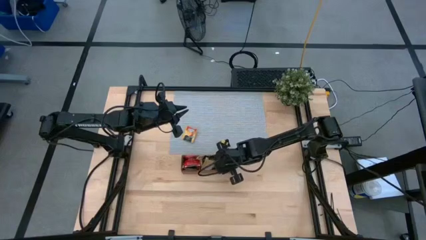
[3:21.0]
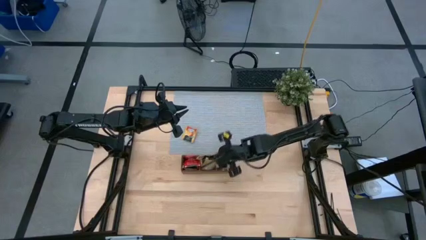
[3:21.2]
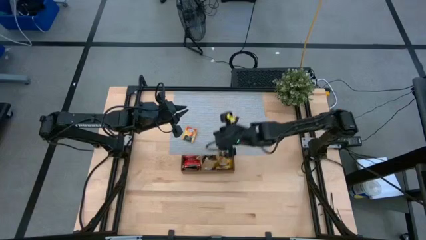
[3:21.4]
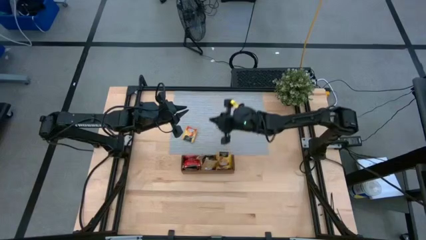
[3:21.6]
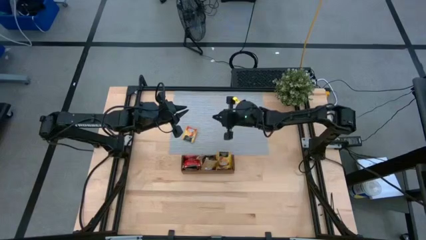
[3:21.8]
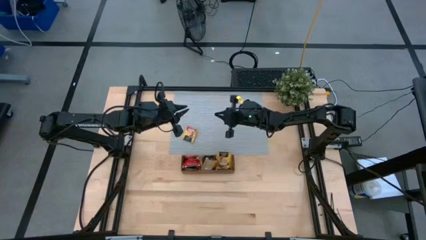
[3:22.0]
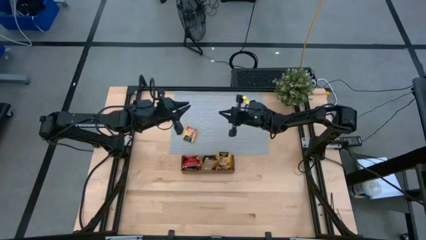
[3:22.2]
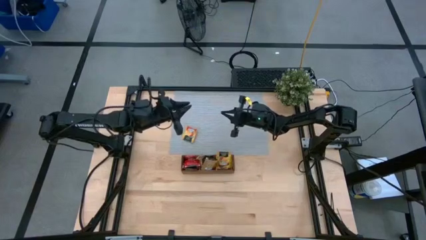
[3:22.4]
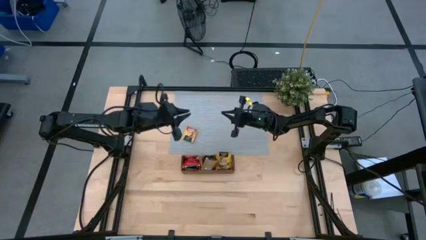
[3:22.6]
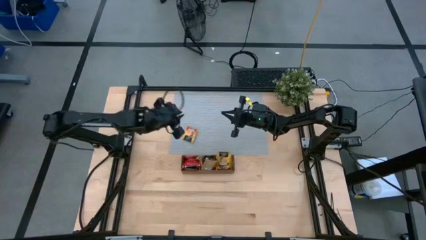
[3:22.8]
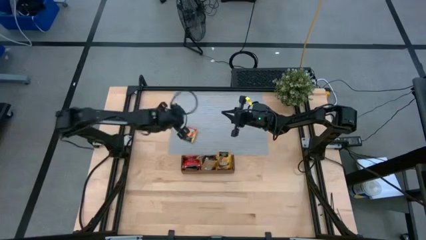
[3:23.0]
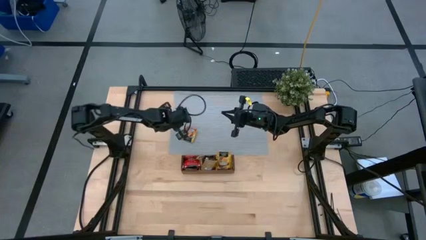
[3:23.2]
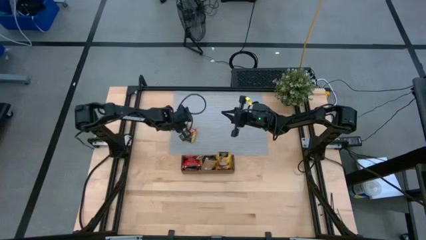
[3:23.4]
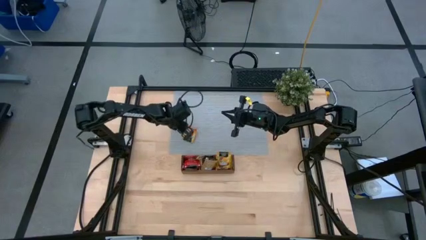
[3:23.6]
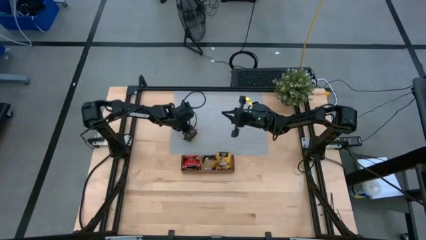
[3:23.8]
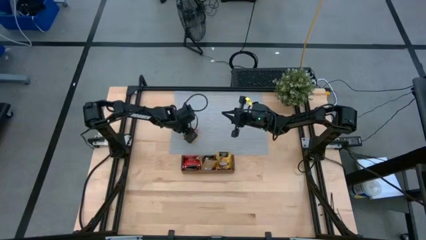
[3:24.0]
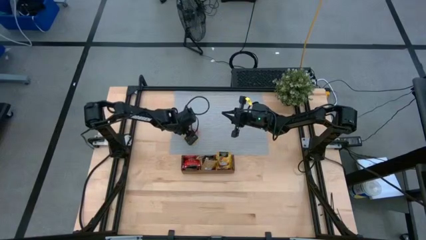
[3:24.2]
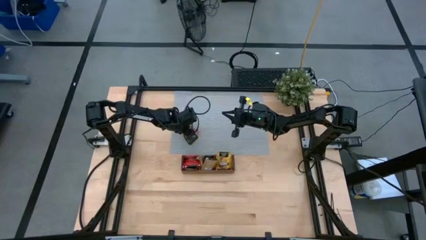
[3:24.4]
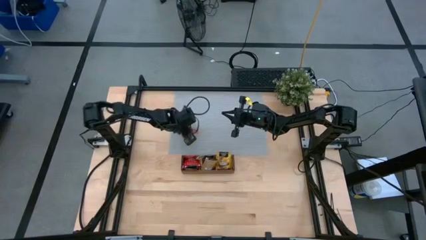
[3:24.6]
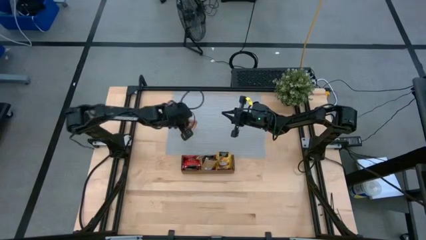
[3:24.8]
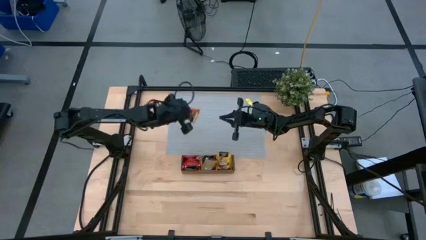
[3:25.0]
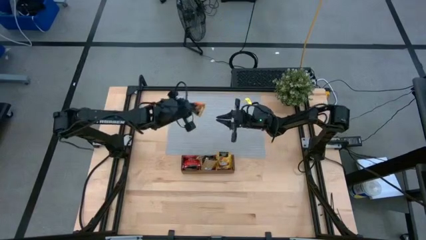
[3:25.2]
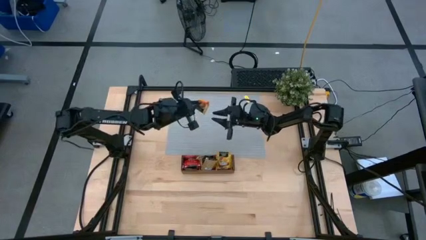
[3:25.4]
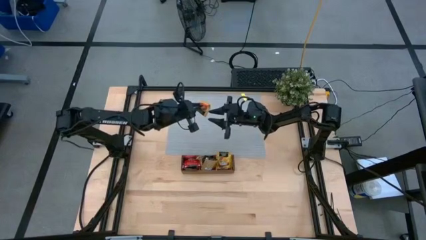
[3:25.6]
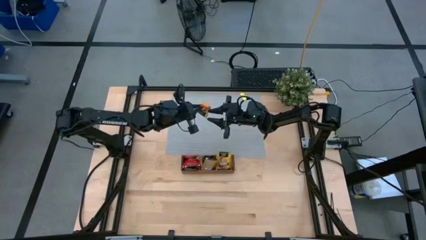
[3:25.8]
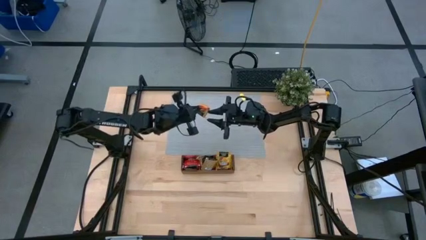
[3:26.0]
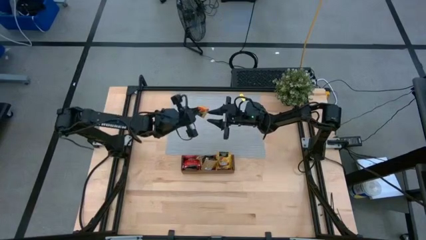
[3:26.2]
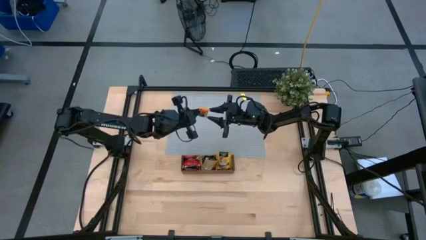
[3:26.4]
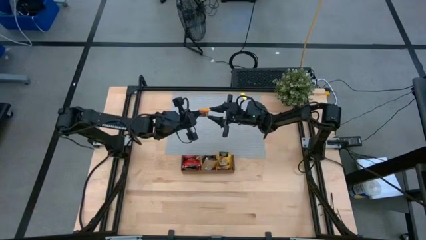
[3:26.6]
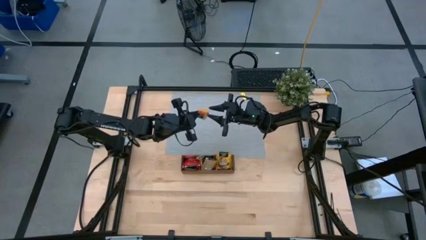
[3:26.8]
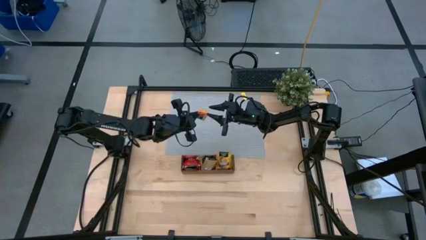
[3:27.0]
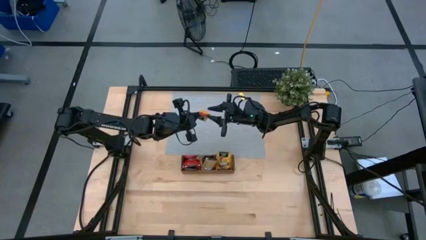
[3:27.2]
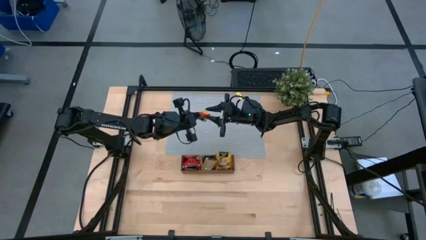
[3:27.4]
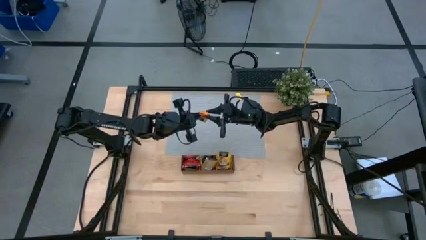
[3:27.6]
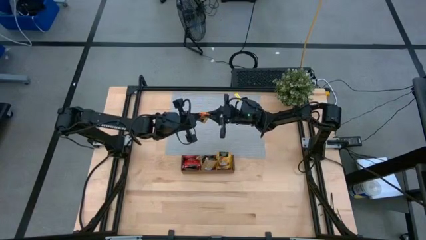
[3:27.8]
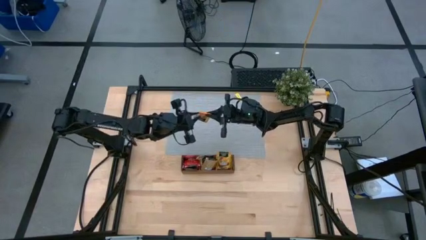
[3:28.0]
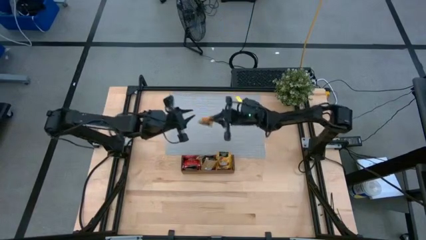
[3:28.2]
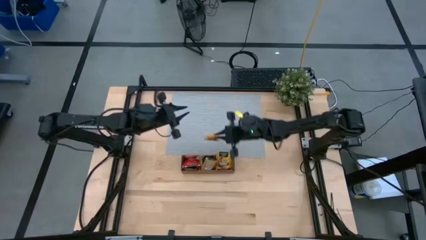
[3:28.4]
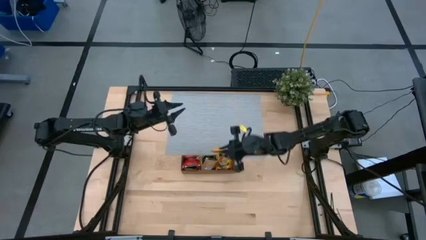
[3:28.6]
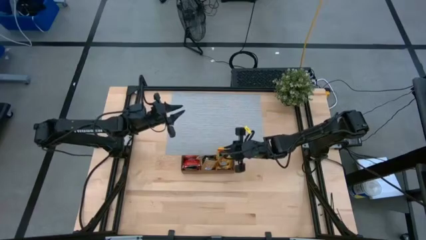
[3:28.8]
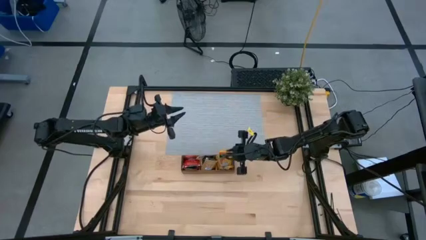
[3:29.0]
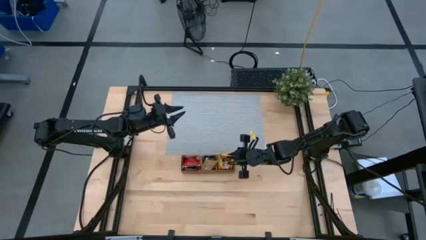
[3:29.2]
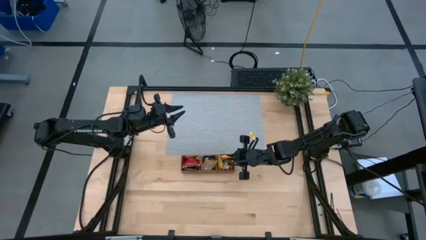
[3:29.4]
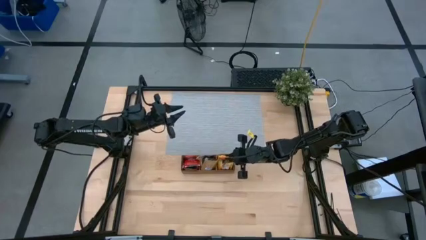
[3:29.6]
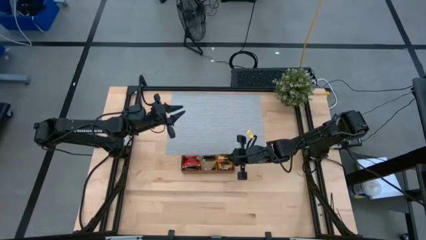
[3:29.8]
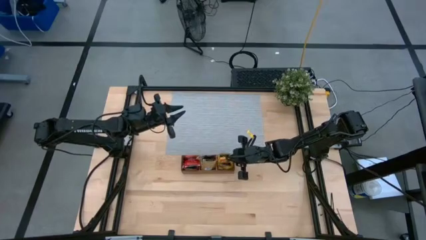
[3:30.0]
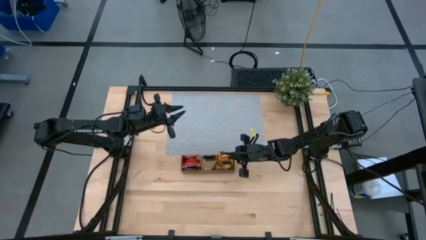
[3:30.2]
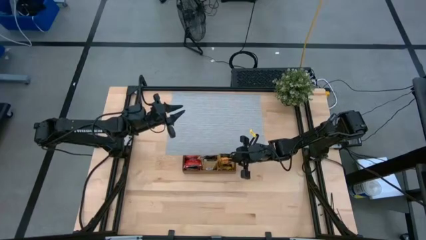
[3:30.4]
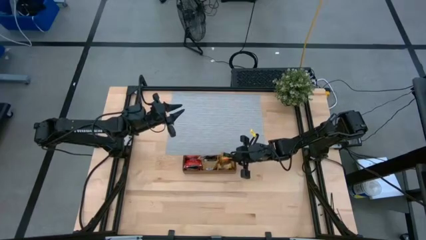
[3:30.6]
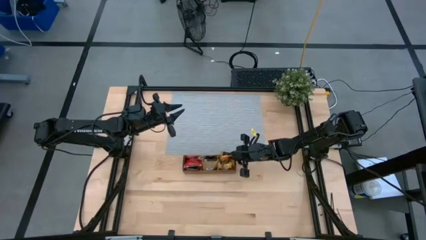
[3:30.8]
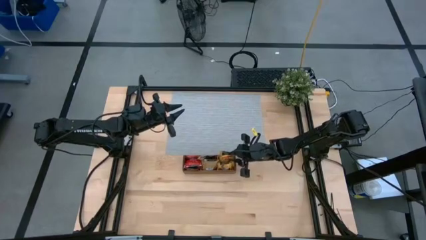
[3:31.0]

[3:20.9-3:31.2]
Task: Pick & Place Tea
Put the yellow tea bag into the right section of the wooden organizer

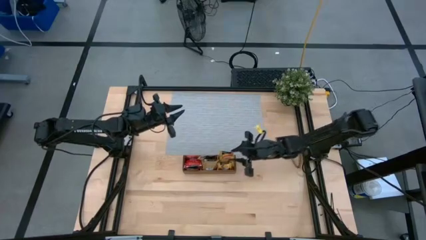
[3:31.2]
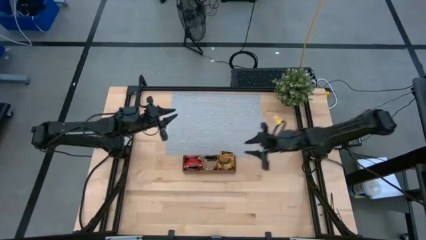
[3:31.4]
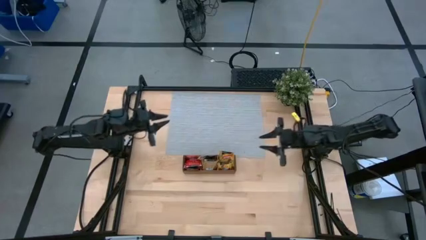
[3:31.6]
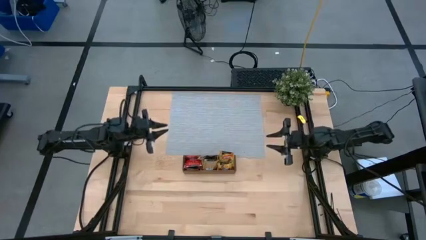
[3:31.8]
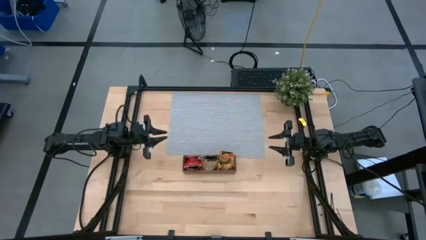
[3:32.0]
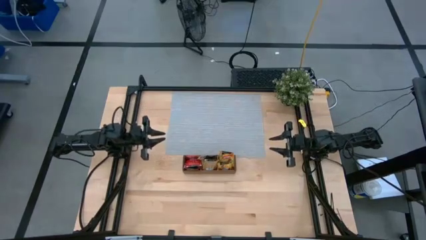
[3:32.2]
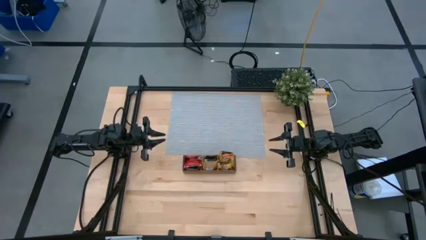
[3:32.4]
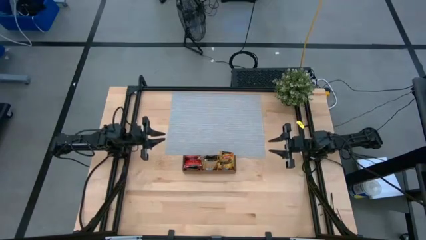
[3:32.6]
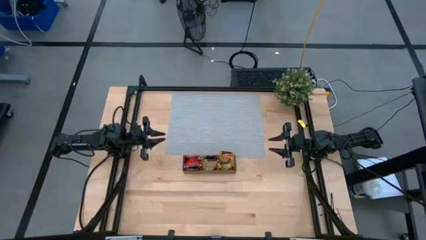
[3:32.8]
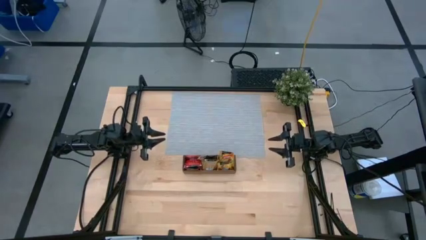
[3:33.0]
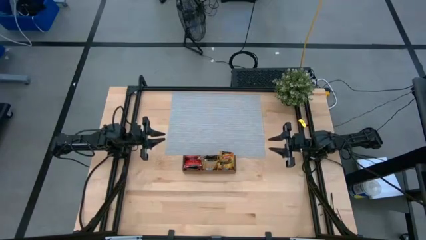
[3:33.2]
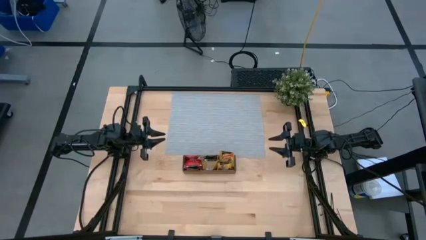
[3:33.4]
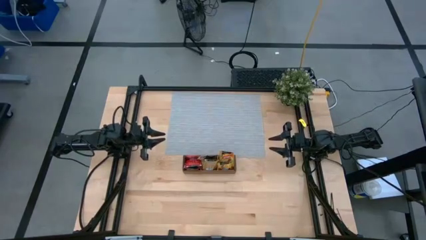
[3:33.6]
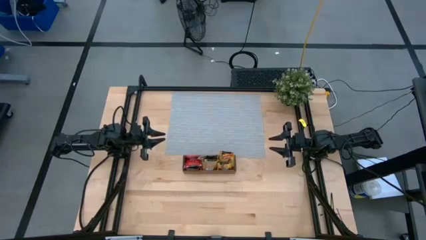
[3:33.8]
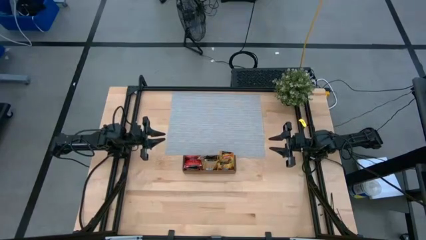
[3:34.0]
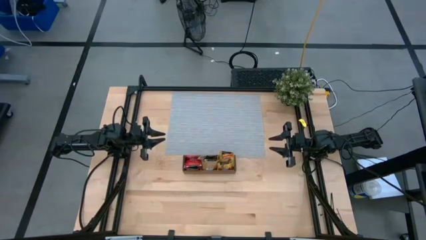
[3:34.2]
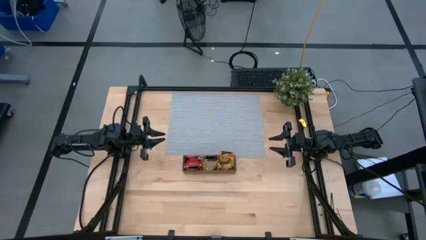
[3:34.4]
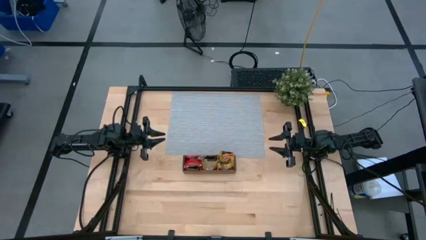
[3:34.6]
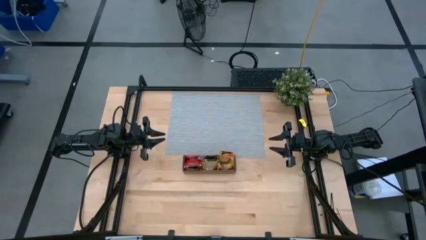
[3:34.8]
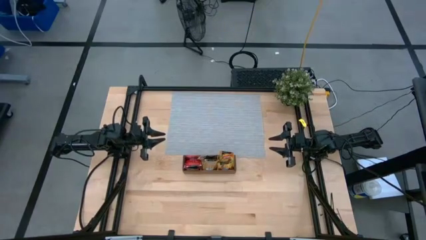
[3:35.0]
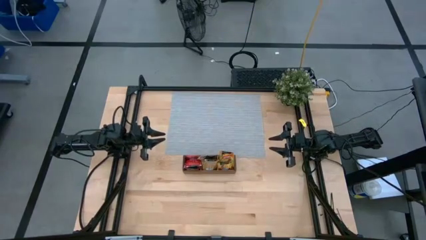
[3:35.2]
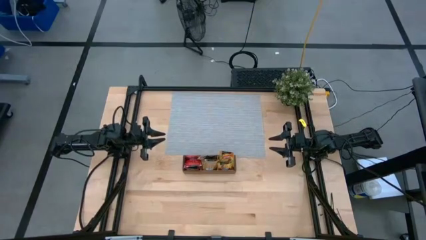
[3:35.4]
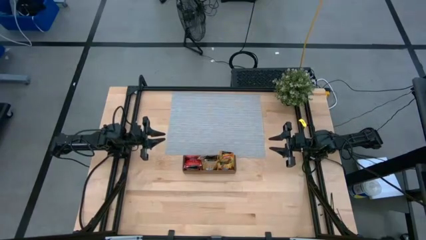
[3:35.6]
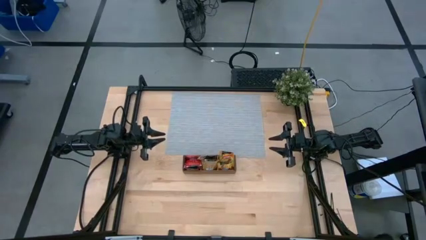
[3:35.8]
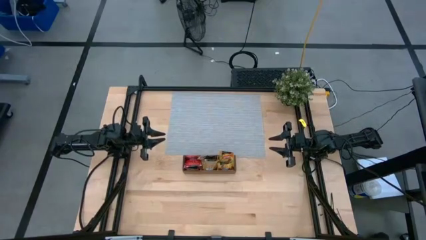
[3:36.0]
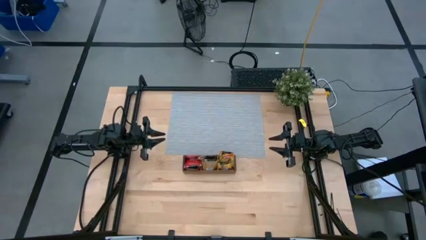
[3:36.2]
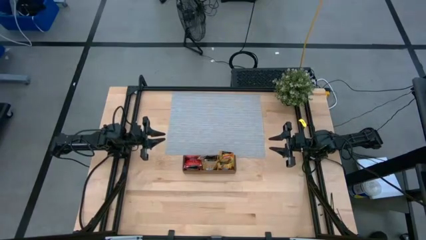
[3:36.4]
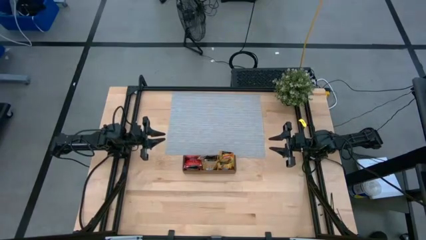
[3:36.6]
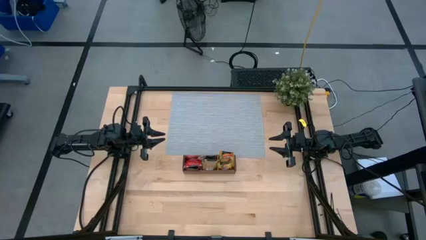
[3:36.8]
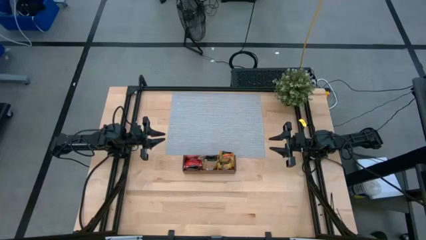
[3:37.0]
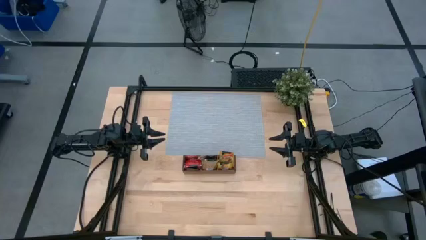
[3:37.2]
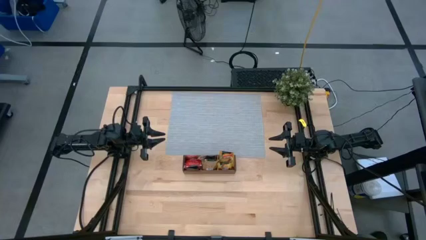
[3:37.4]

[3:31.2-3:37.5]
Return to Home Position
